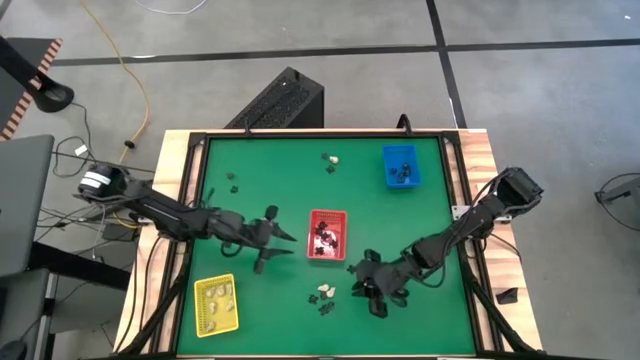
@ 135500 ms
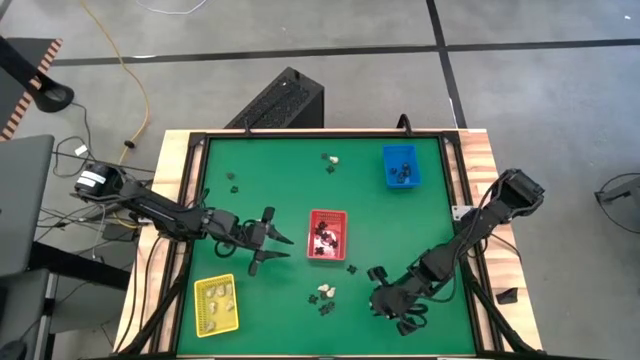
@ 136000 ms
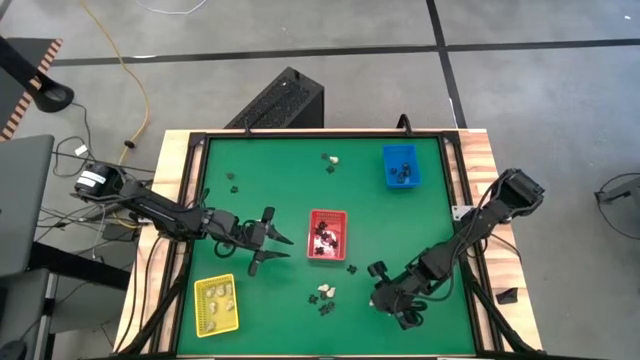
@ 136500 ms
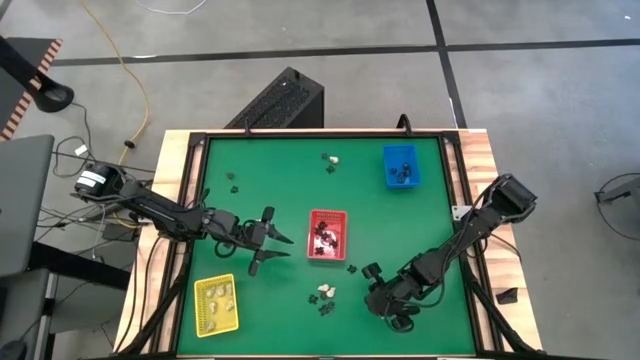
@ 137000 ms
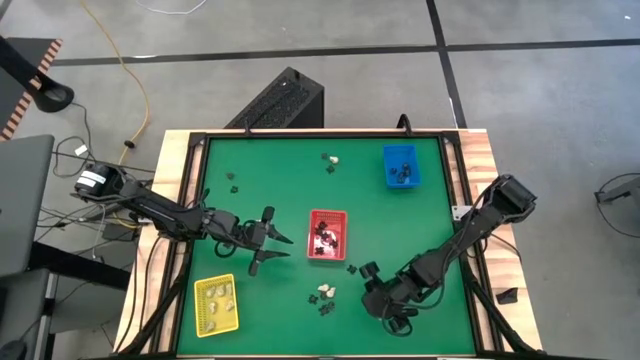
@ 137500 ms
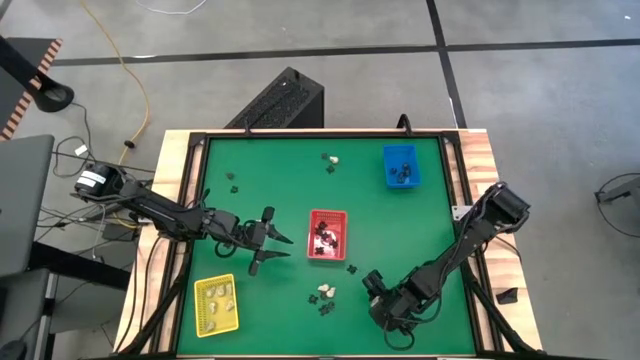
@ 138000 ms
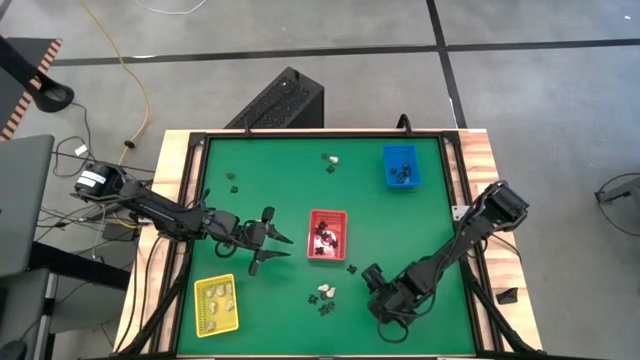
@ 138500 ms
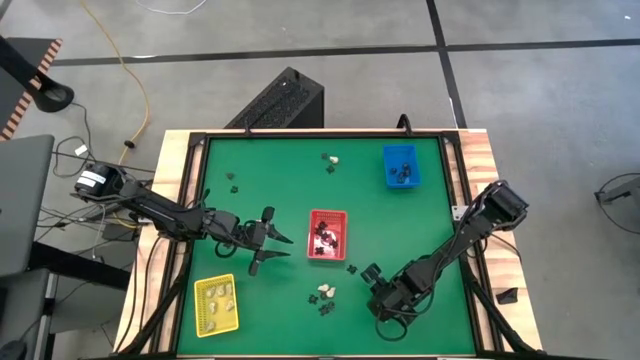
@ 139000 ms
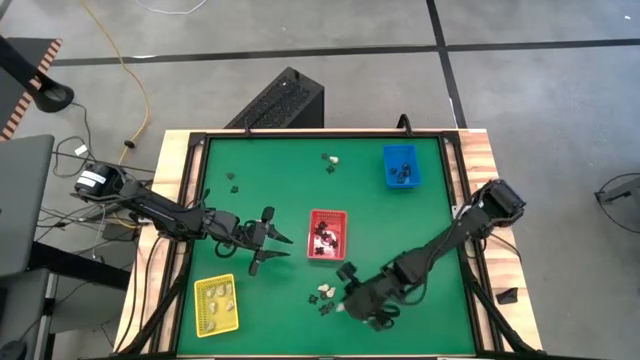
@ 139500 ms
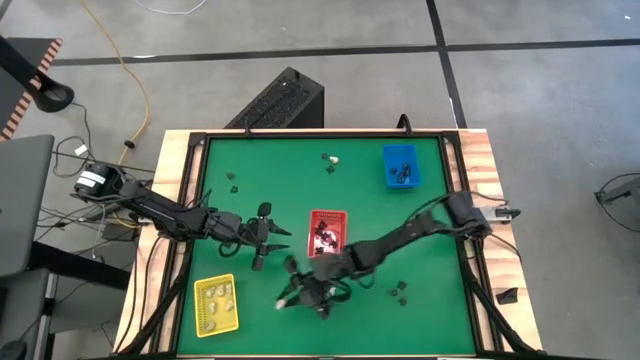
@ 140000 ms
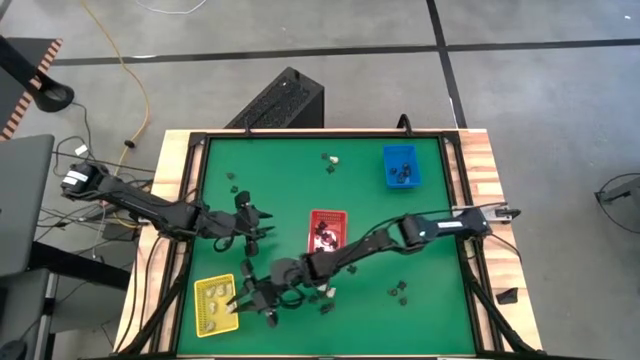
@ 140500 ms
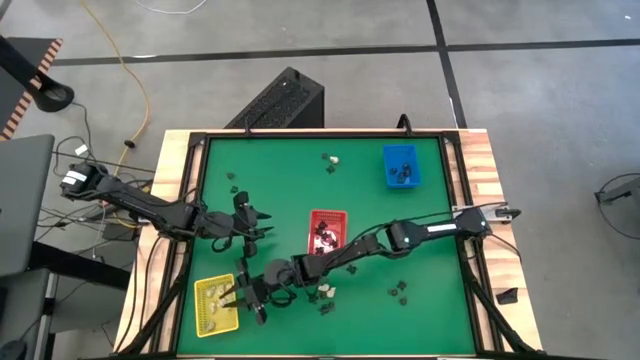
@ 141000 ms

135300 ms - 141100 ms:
Task: Sort Halloween decoration
Put the white skull toy into the yellow bin

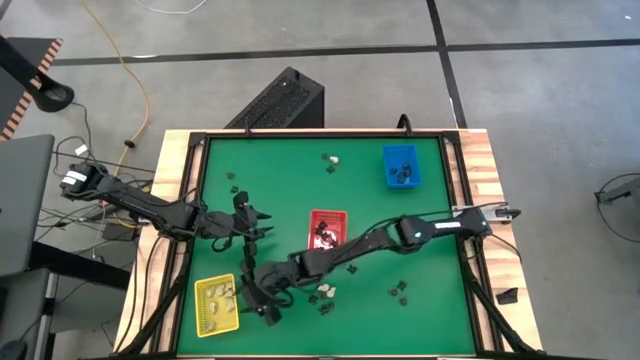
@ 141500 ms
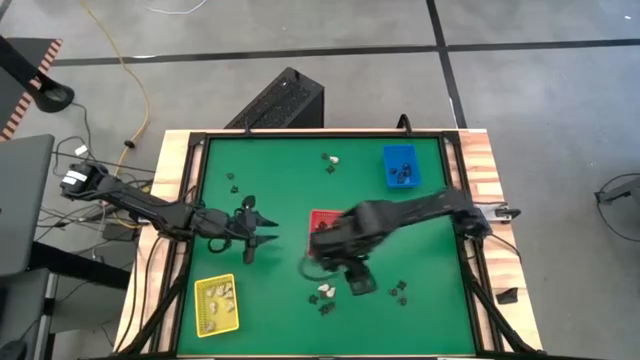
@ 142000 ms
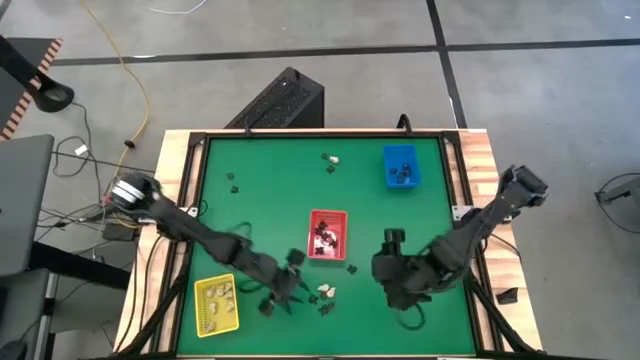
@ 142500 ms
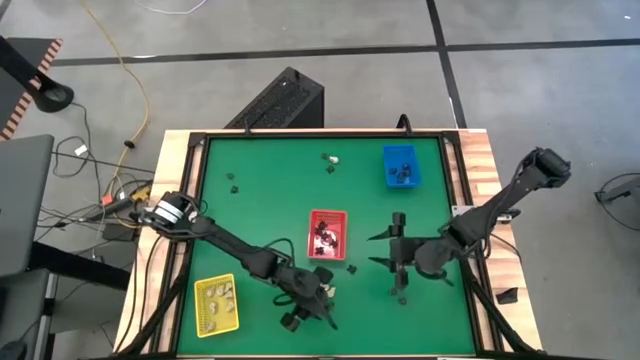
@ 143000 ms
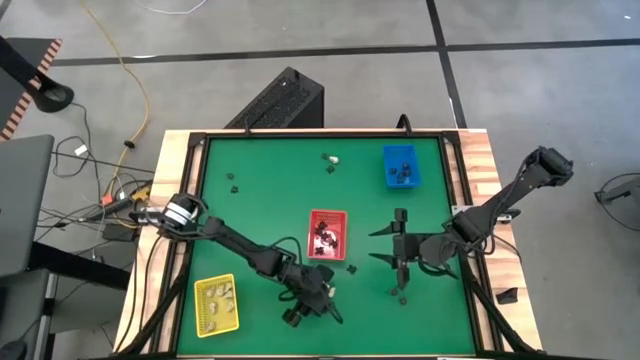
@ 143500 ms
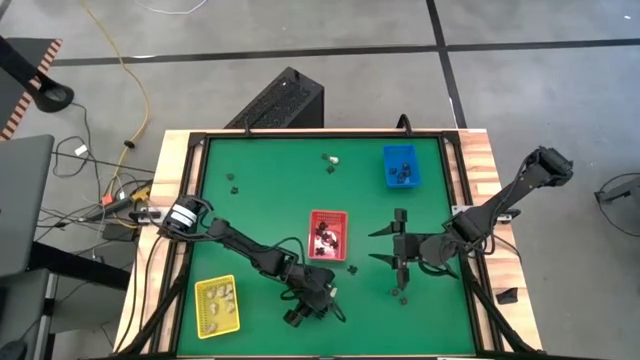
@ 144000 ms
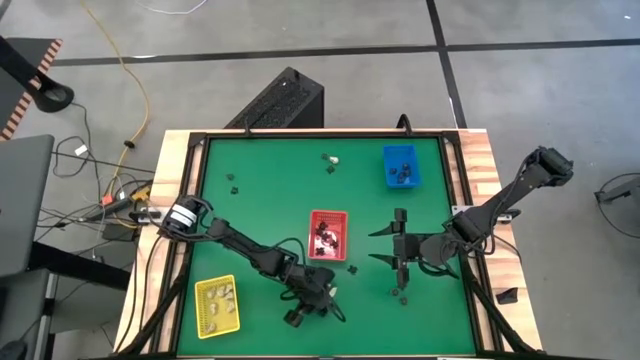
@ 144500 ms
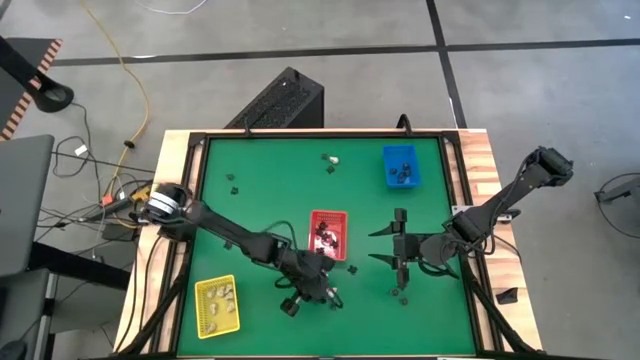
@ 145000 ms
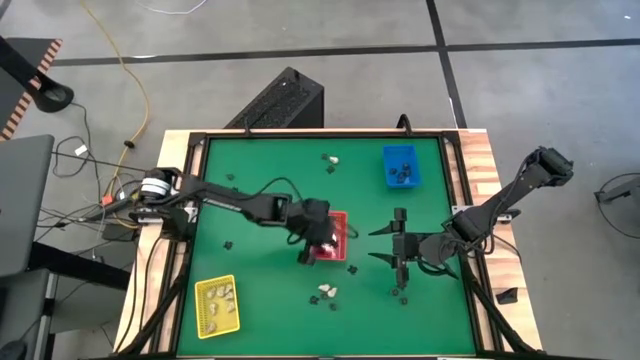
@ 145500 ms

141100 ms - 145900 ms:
Put the black spider toy into the red bin

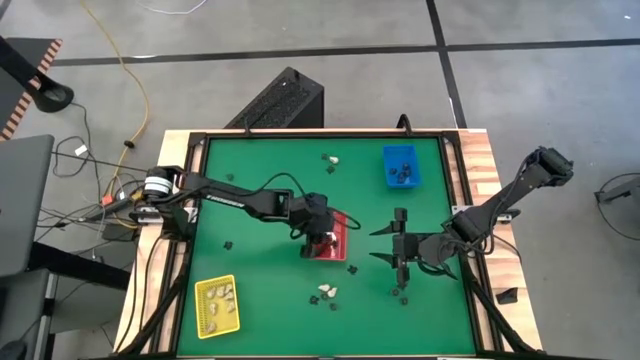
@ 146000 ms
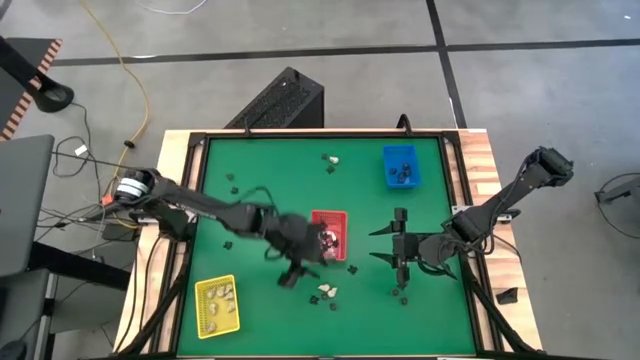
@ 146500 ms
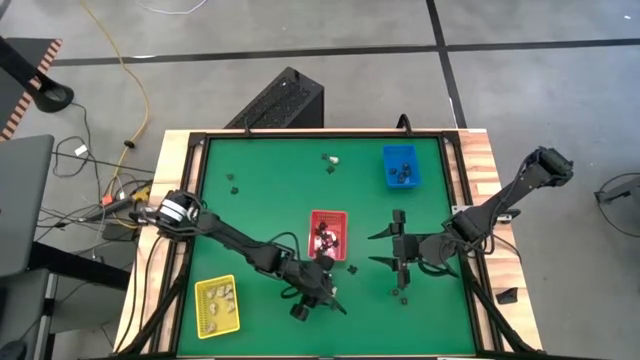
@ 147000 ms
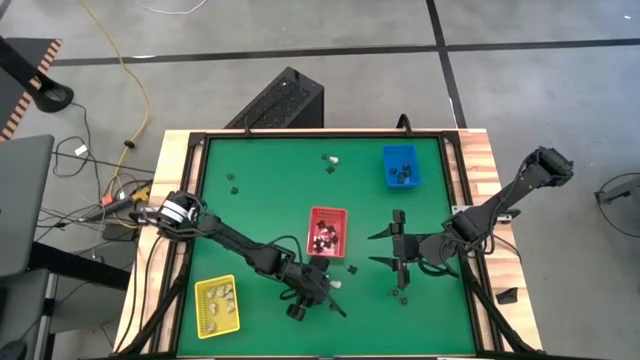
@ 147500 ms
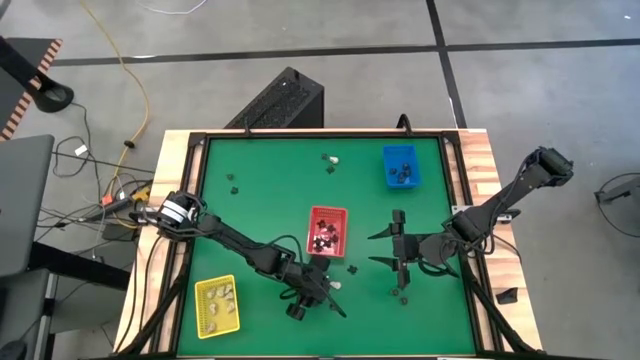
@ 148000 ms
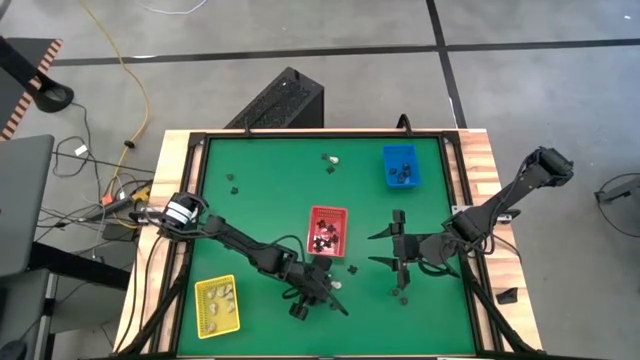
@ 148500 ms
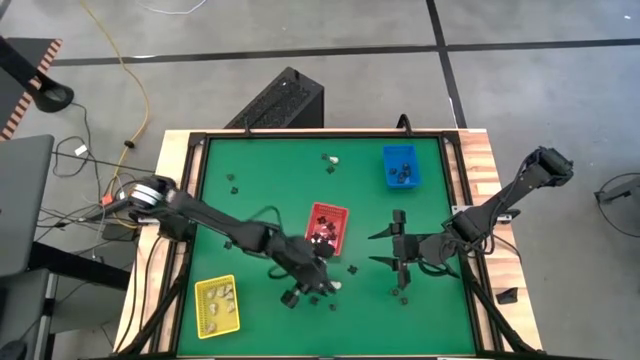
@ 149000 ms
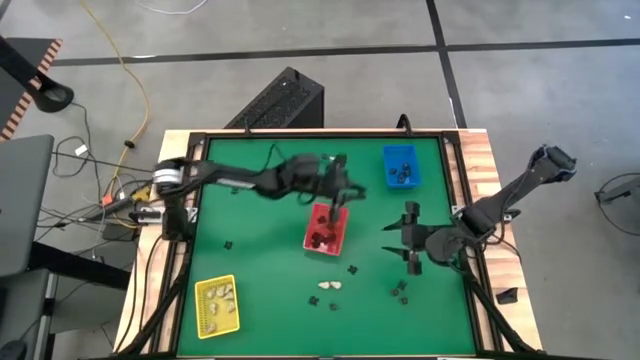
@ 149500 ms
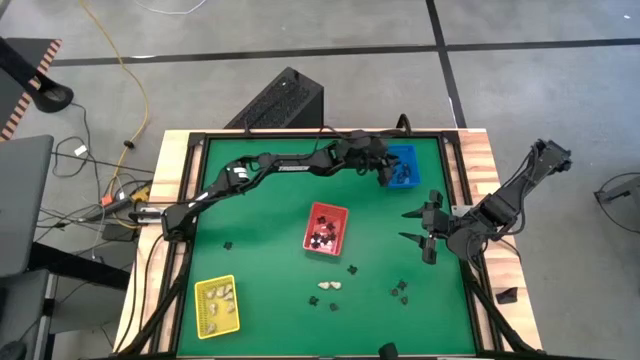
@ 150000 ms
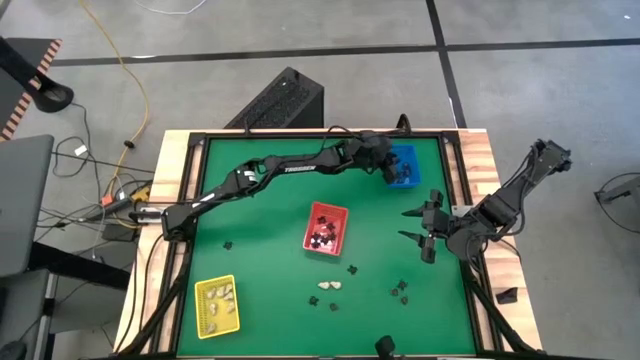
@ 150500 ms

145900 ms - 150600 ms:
Put the black skull toy into the blue bin

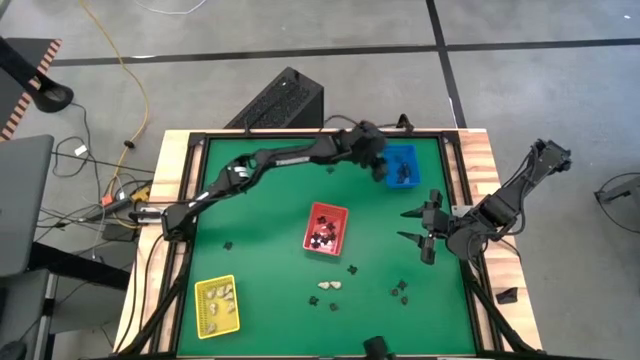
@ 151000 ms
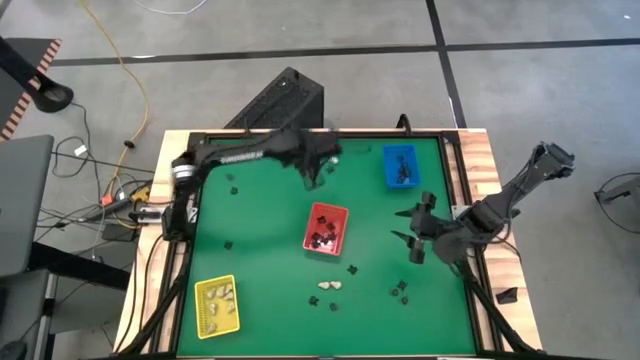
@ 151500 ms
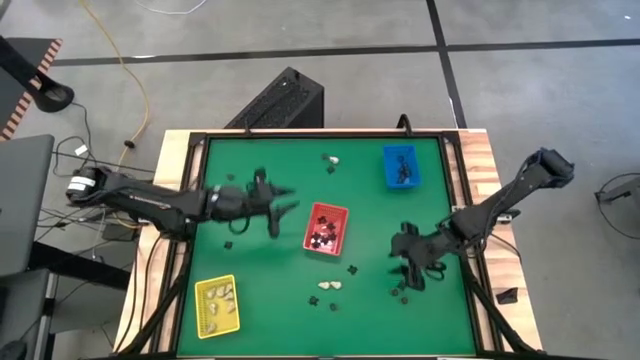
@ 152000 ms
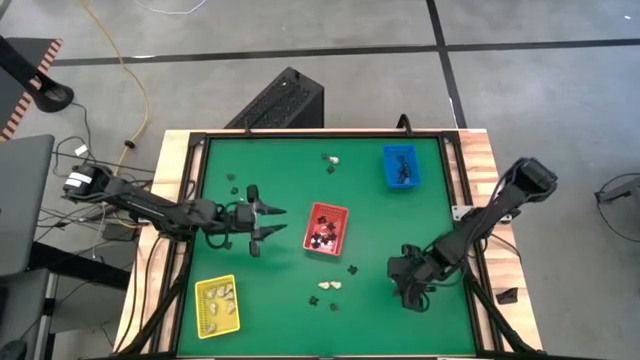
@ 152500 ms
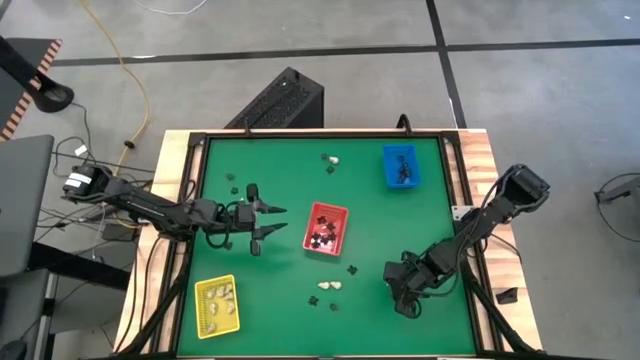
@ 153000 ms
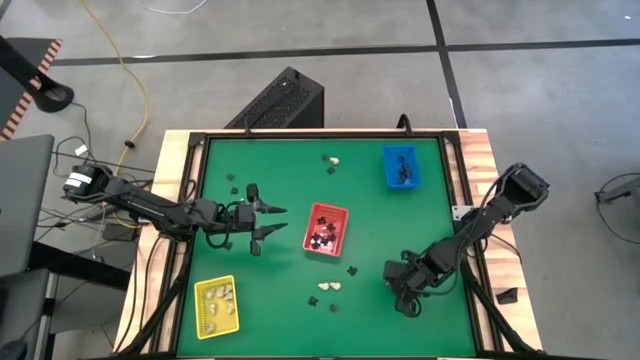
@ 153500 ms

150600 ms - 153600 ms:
Put the black skull toy into the blue bin

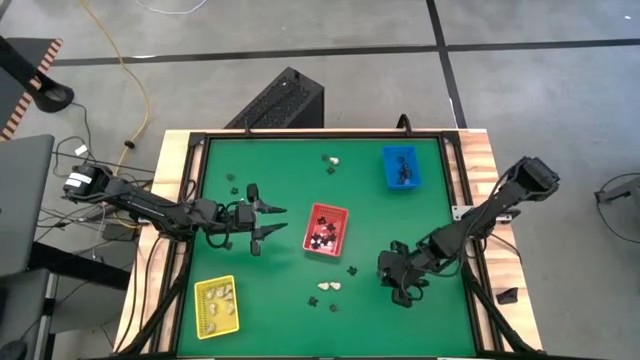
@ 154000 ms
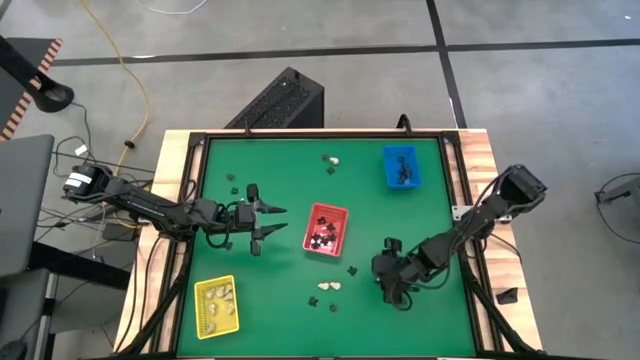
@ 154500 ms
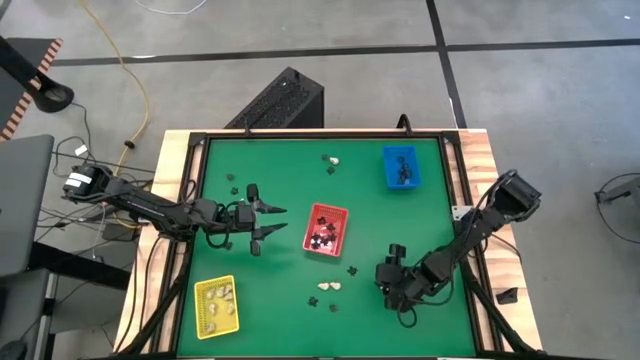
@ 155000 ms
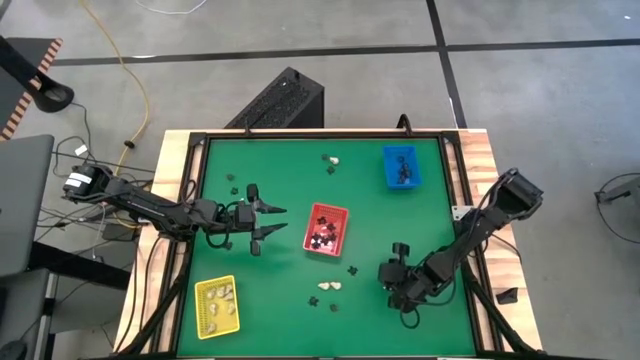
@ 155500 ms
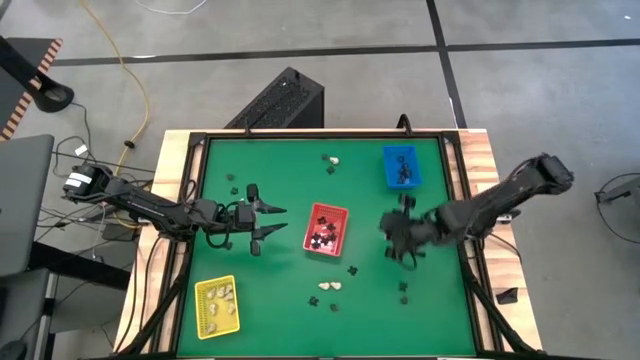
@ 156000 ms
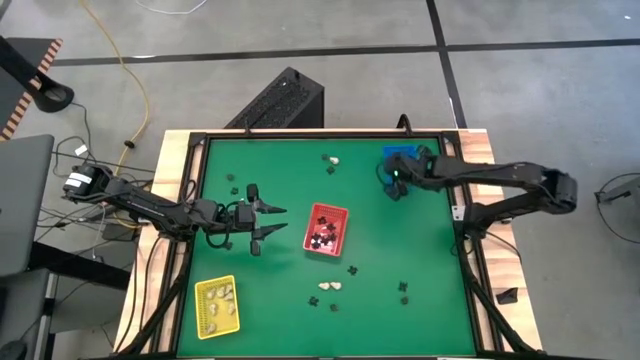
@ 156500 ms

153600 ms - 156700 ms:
Put the black skull toy into the blue bin
